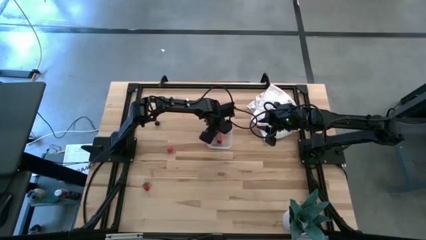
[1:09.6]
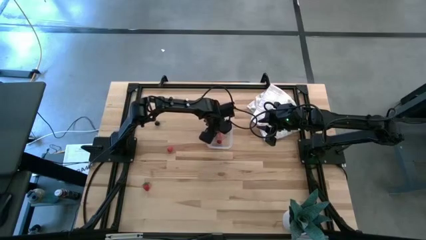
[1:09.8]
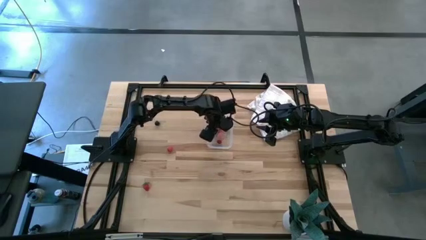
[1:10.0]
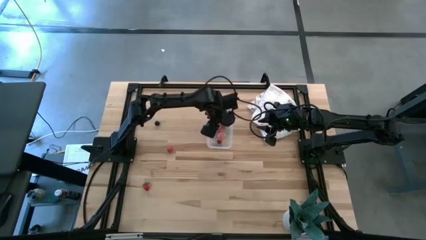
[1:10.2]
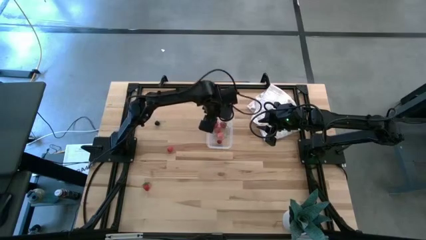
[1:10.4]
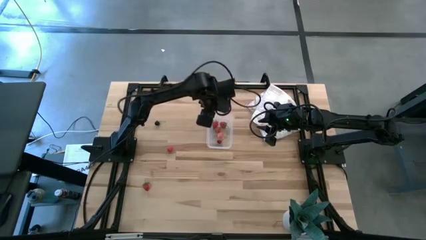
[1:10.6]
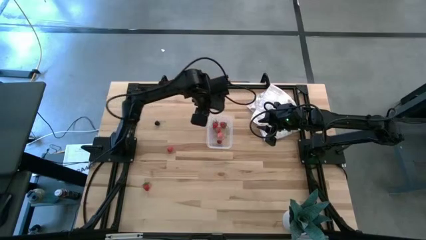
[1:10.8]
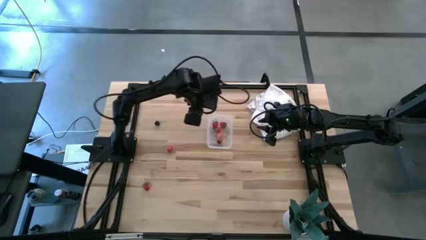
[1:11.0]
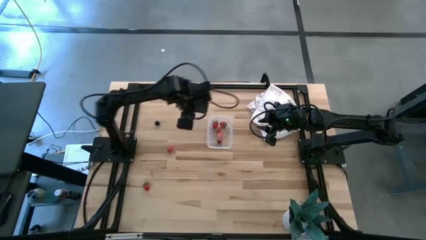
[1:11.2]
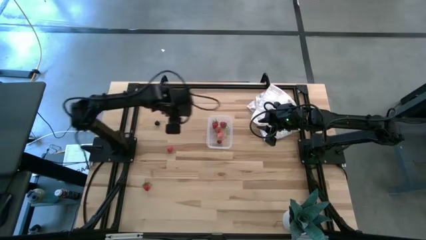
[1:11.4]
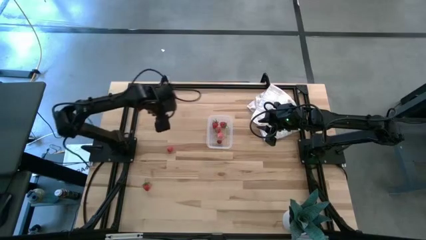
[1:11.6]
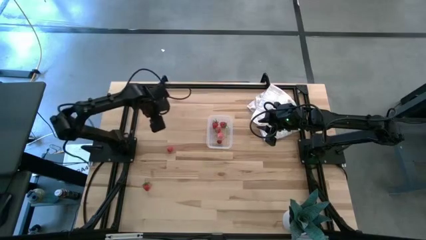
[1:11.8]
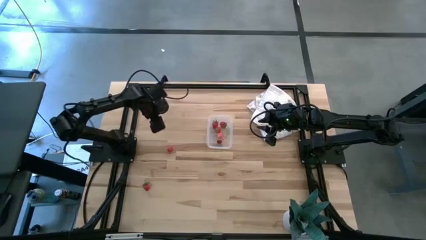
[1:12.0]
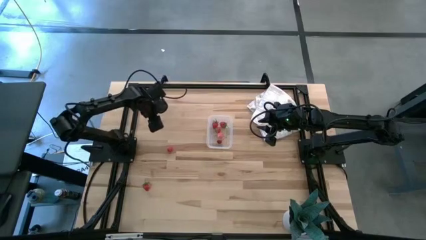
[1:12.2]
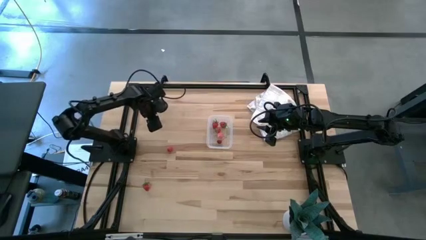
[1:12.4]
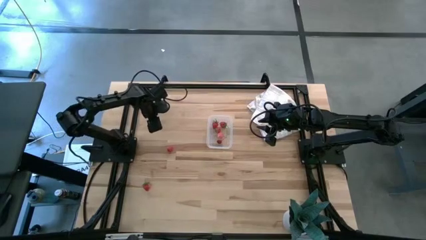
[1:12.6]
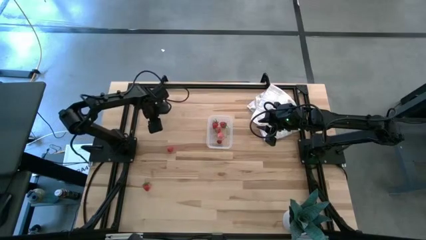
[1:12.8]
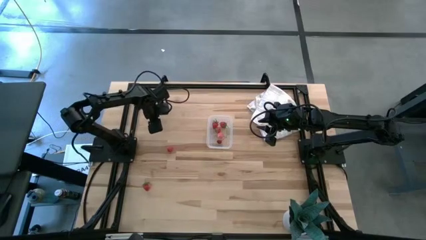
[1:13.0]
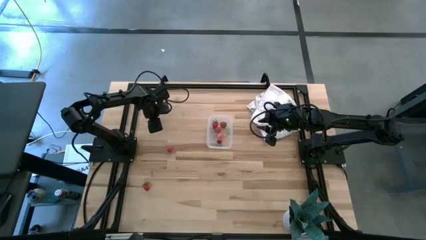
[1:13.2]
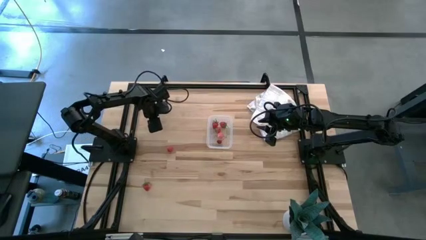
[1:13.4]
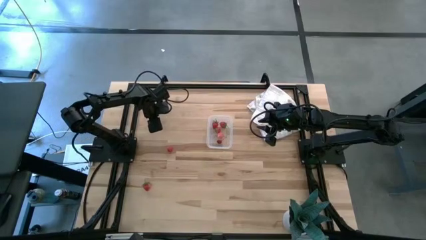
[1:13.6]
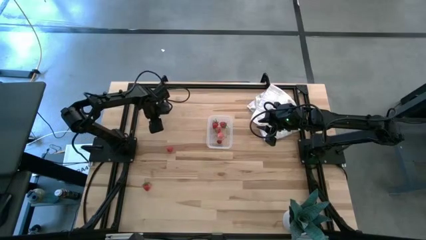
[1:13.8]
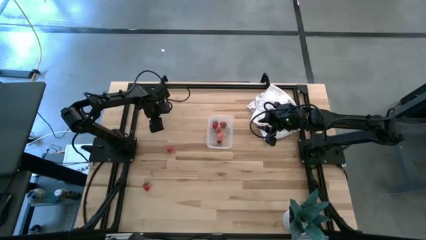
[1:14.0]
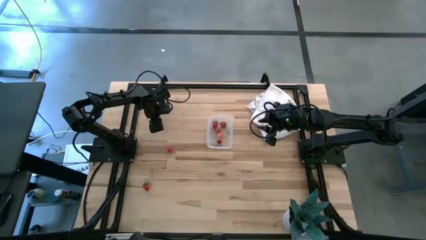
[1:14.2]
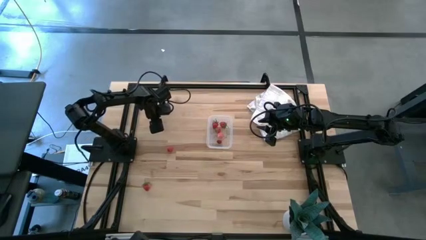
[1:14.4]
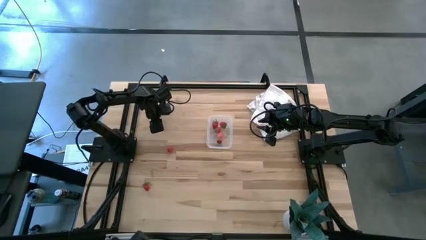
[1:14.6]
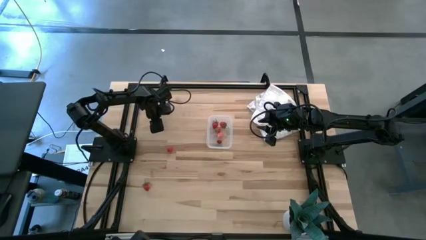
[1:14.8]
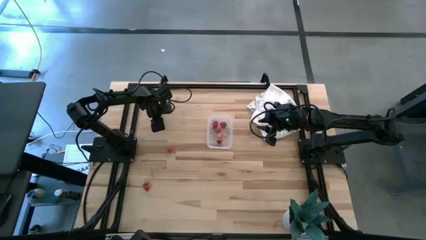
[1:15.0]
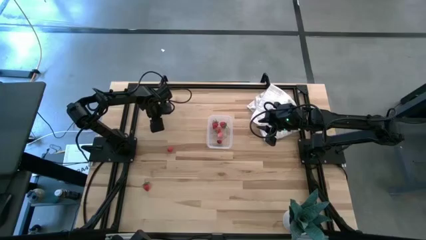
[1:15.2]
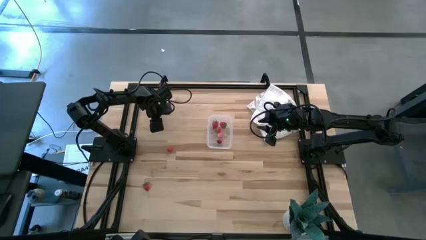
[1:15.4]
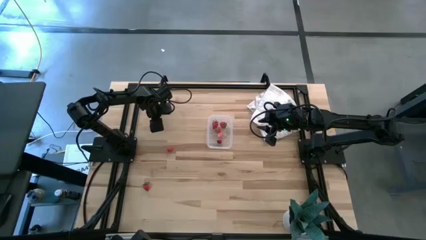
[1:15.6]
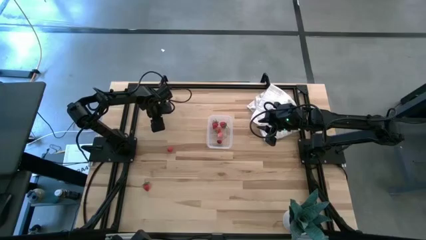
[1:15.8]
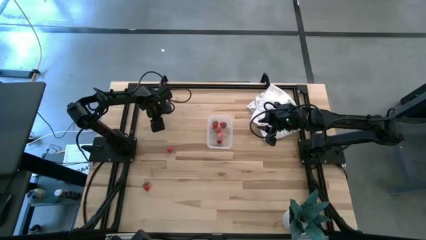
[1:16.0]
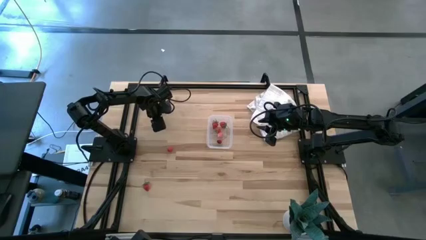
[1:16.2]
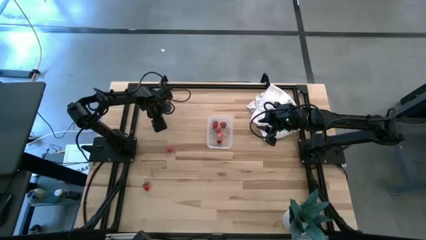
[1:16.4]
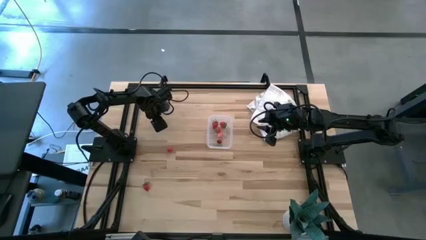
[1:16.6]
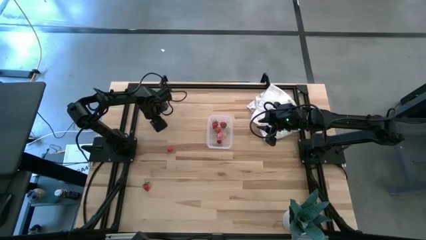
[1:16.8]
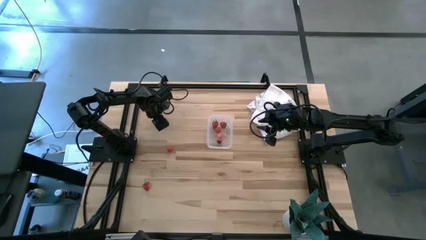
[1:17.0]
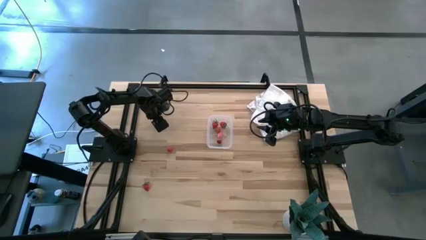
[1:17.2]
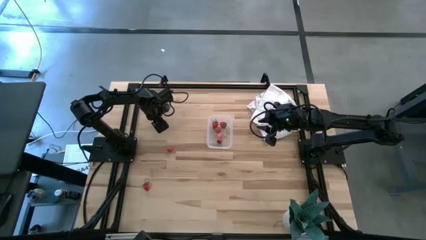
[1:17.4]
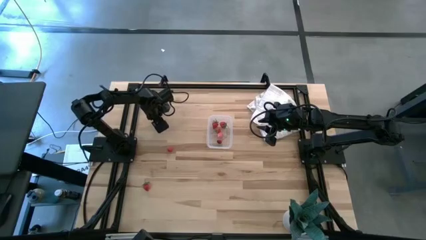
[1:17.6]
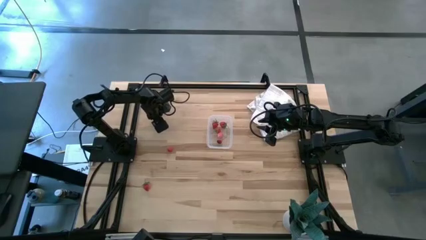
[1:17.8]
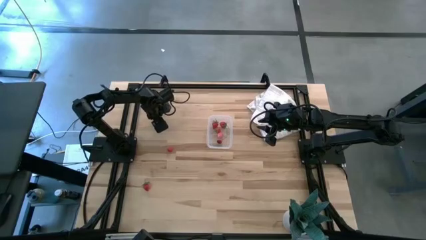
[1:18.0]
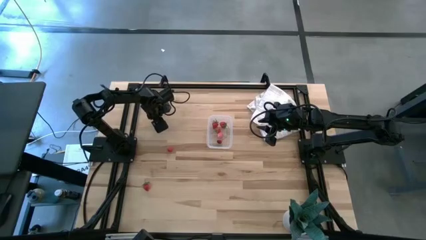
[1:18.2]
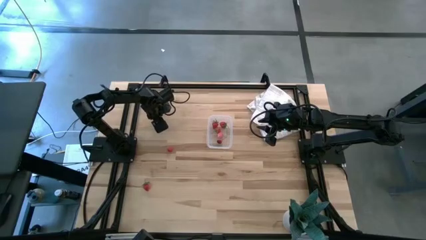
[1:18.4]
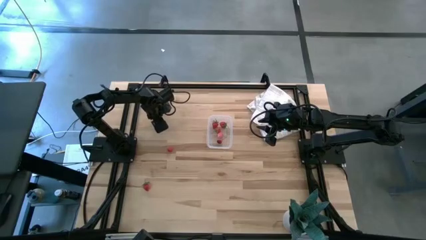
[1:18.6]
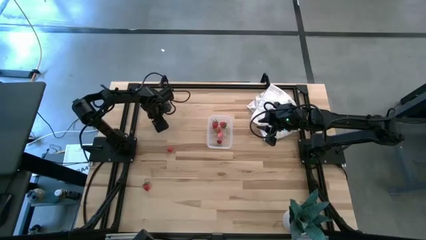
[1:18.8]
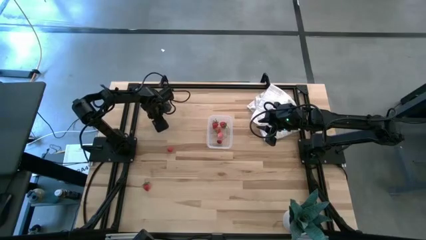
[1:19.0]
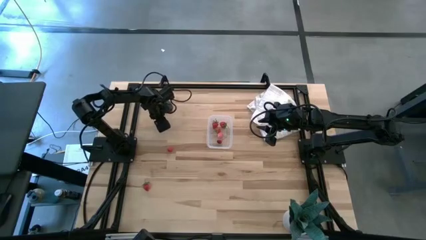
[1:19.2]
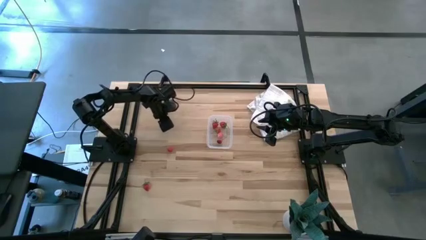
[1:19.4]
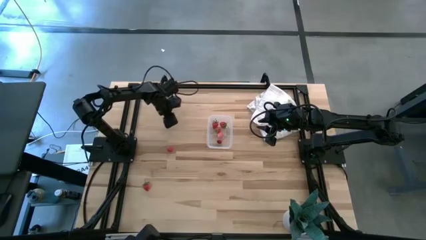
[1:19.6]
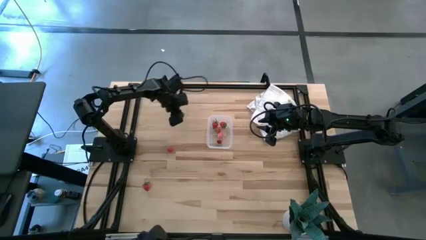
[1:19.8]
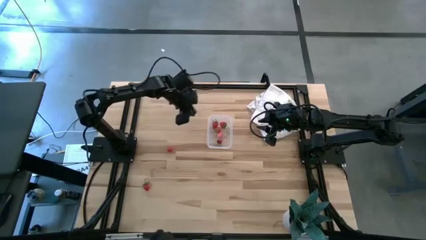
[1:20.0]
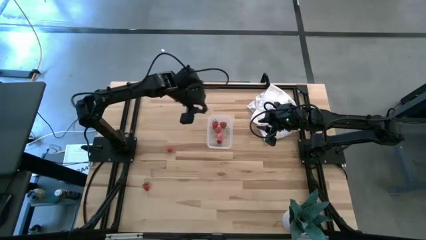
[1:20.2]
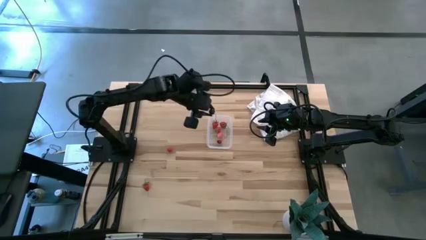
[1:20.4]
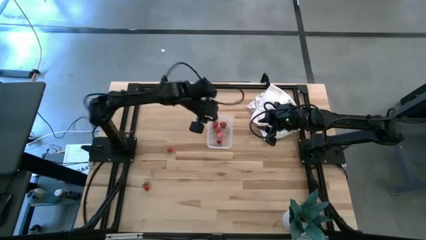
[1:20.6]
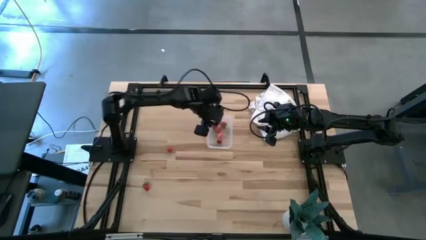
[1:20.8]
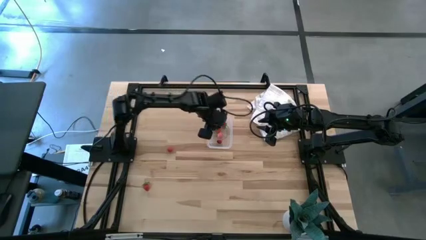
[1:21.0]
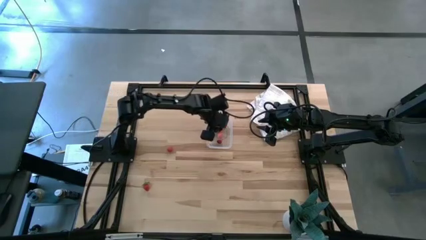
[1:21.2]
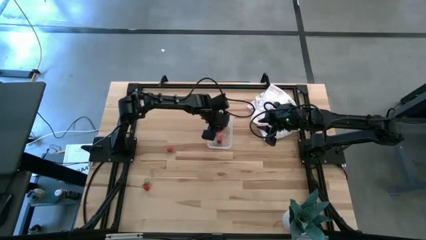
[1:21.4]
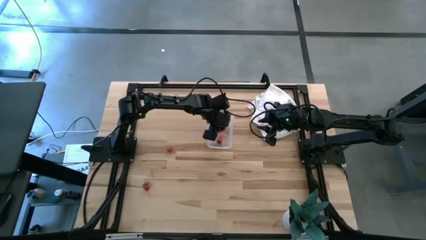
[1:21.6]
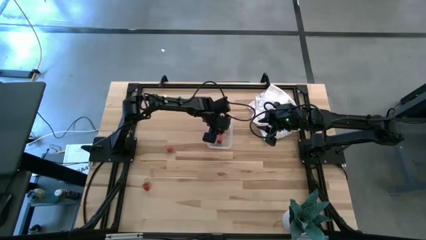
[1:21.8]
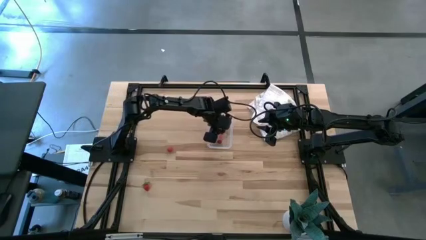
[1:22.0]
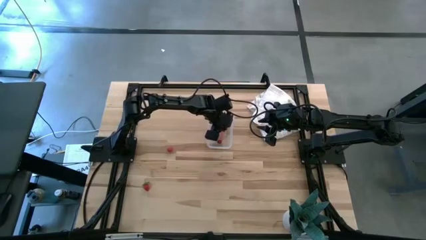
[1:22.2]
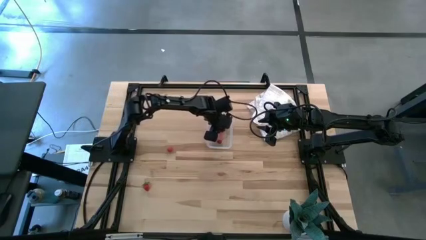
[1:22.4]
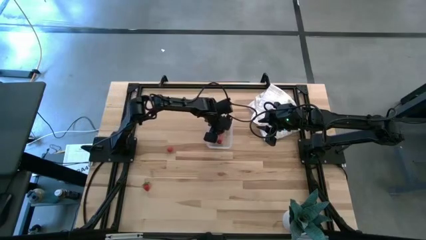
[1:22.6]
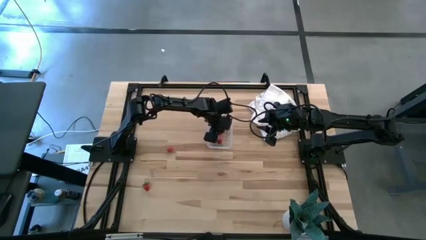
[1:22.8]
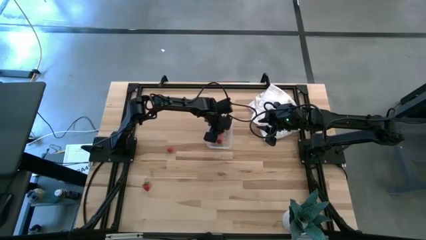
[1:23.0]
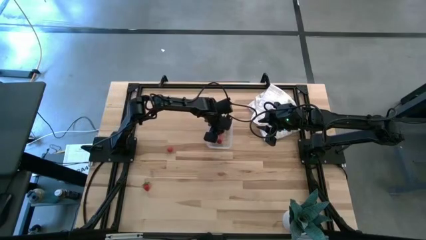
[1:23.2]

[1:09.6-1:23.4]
Task: Pick and placing Produce into tupperware
Put the plum into the transparent container
